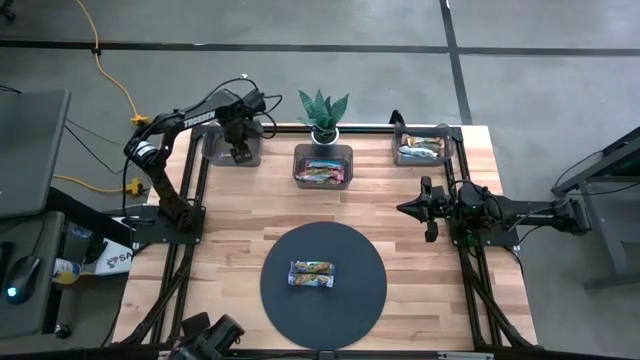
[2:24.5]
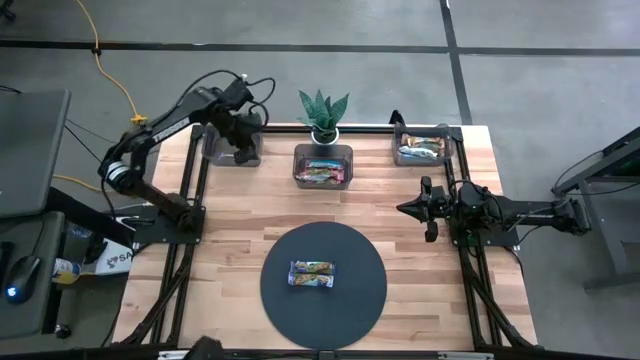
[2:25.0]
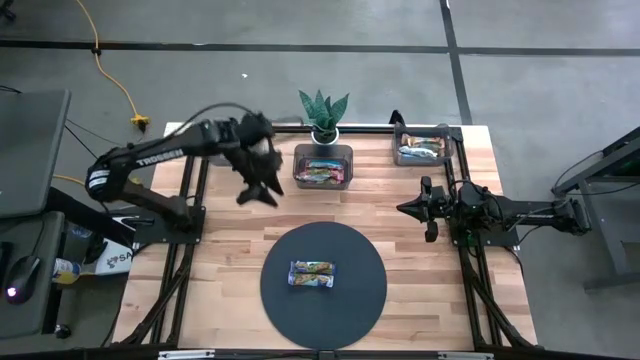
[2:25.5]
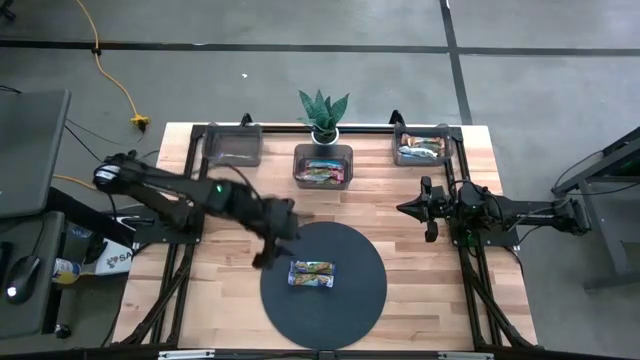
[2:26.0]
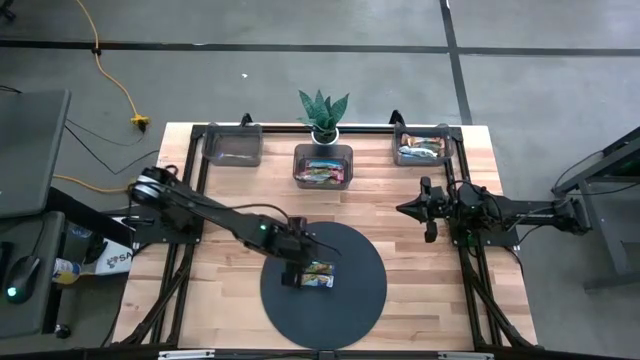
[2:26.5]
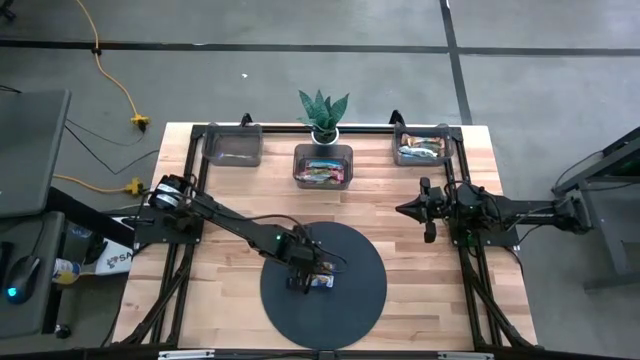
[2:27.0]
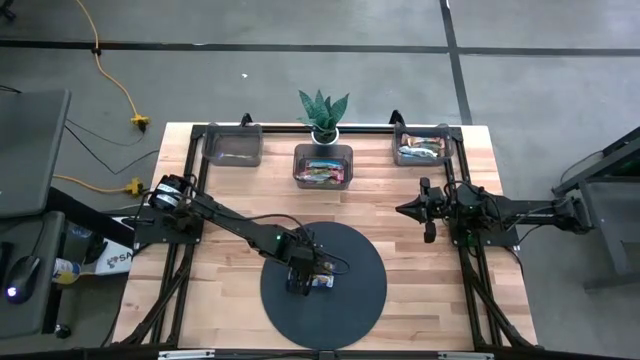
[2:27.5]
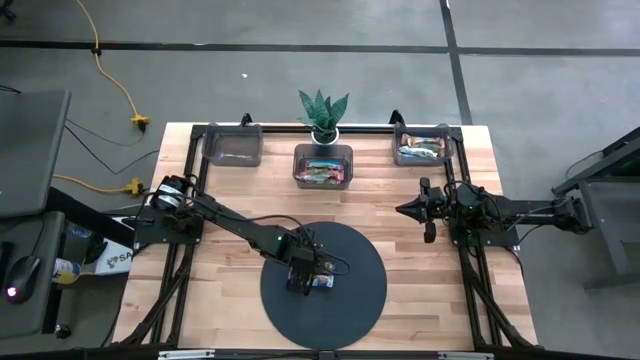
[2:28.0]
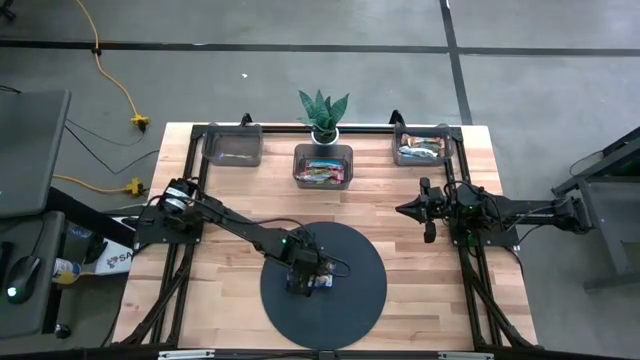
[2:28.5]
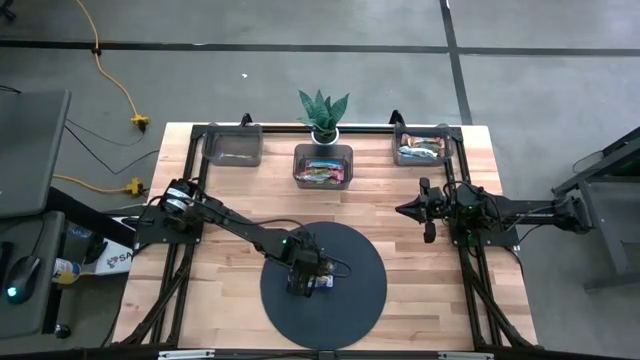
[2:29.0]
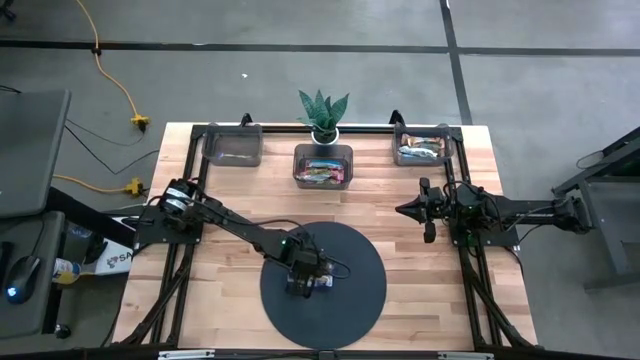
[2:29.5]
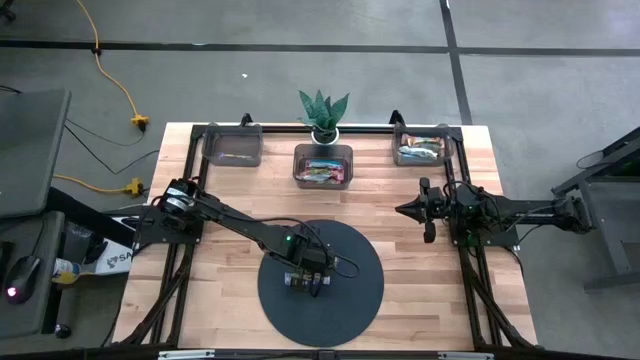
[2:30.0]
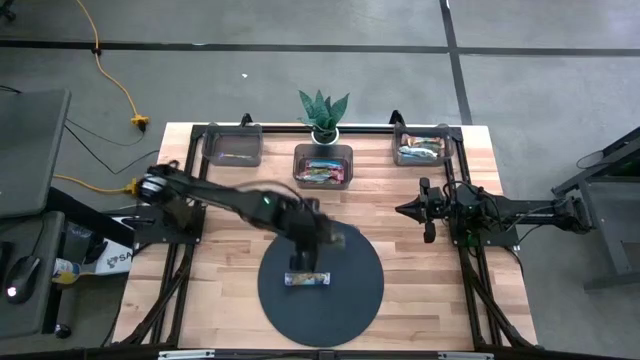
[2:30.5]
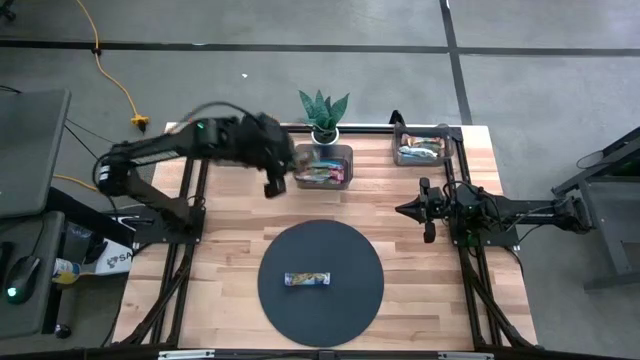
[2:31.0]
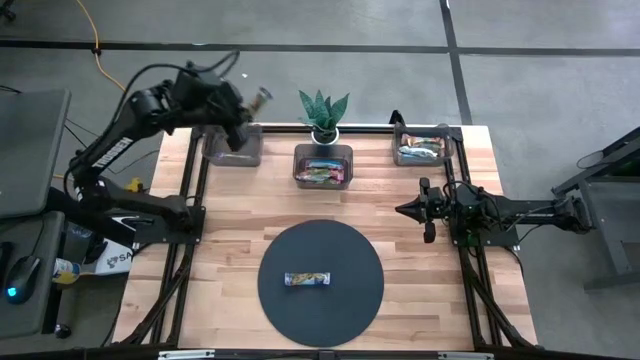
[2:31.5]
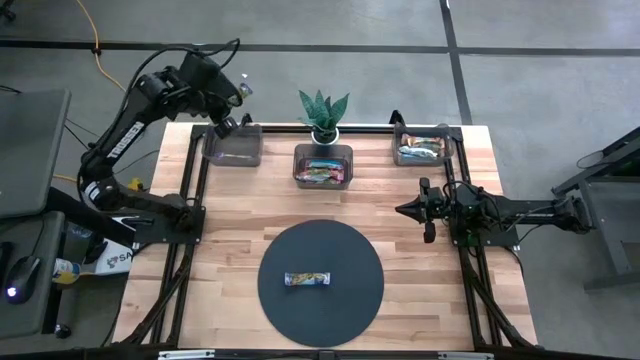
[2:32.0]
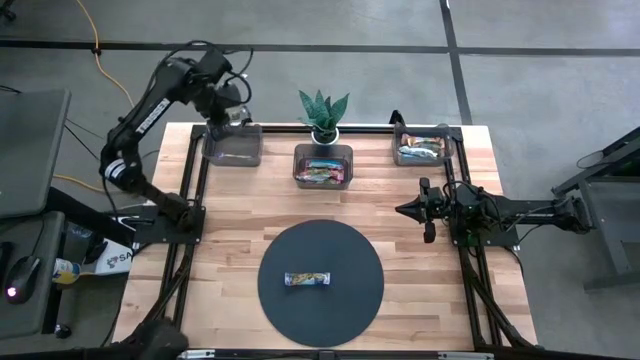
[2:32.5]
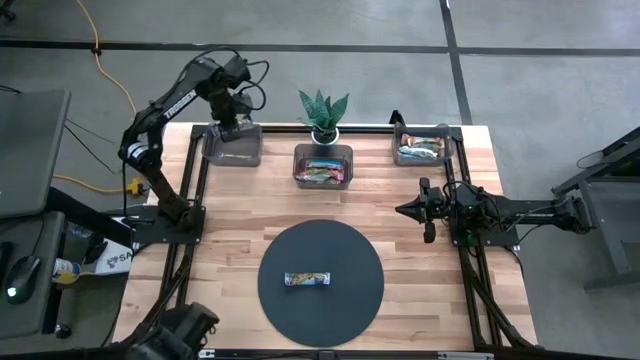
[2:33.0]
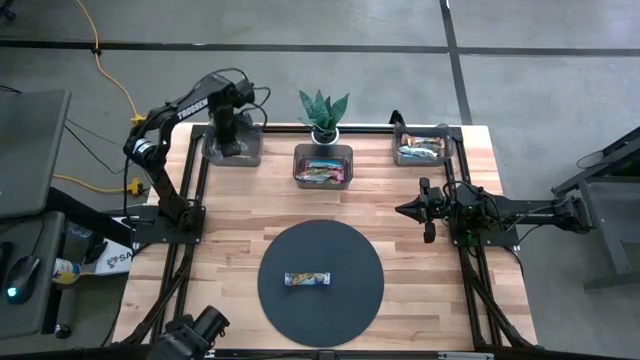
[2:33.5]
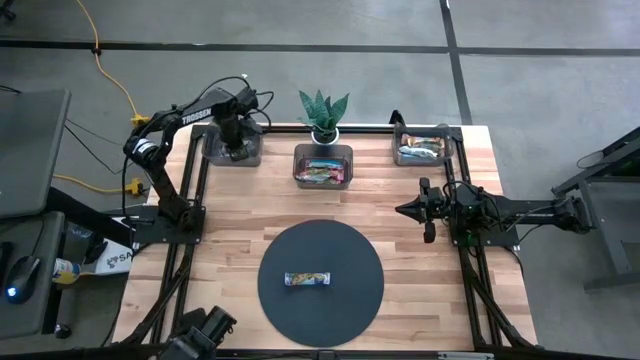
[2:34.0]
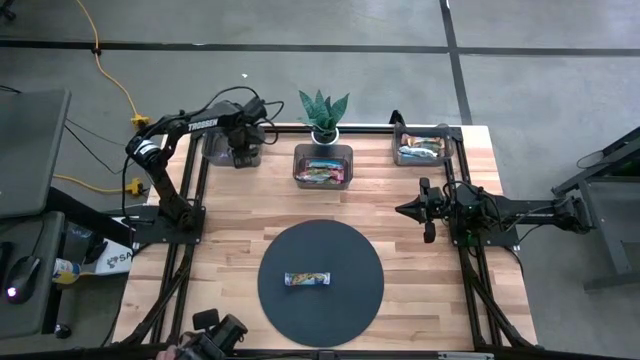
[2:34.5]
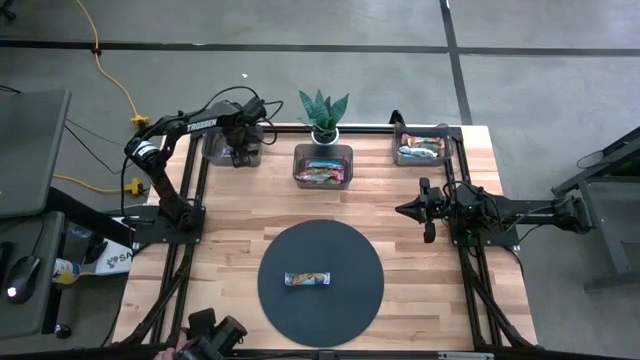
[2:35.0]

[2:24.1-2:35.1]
Task: Pick and place Granola Bars by type
Put the blue granola bar into the left black bin

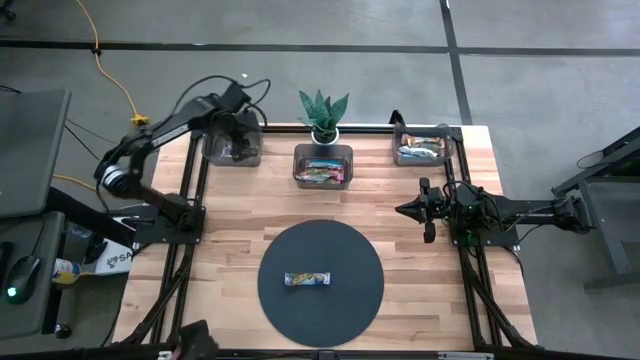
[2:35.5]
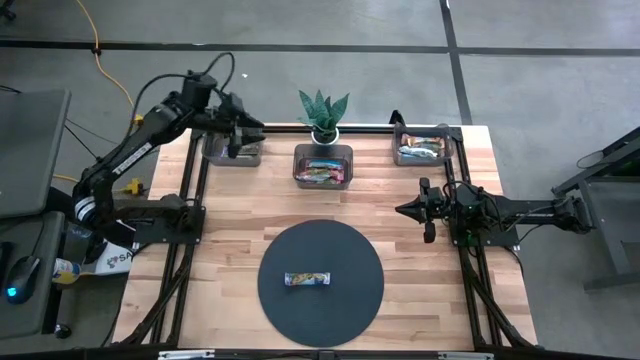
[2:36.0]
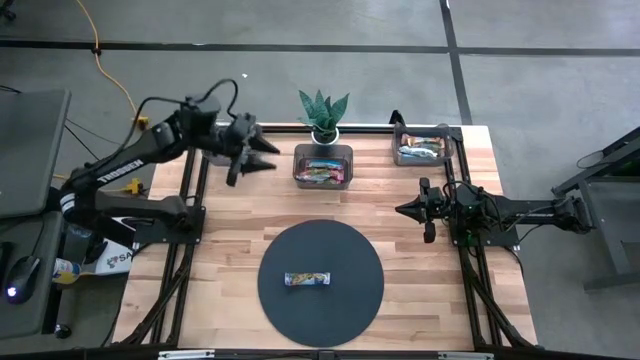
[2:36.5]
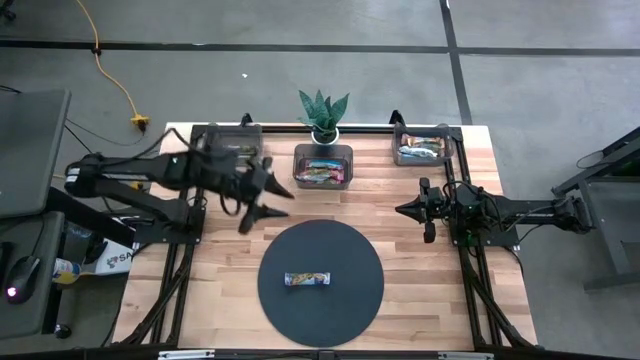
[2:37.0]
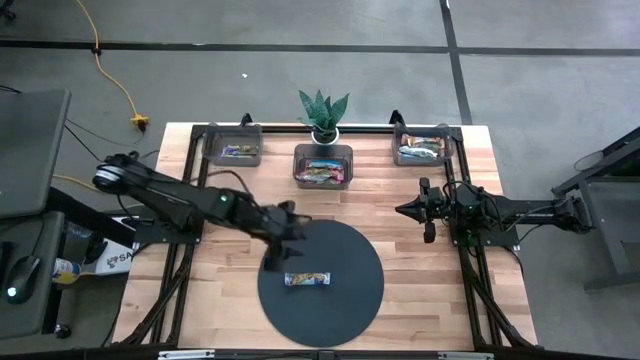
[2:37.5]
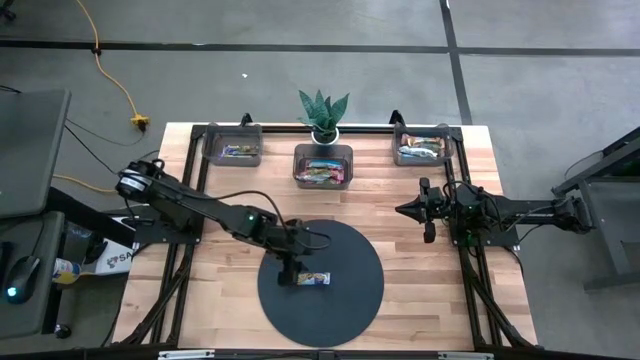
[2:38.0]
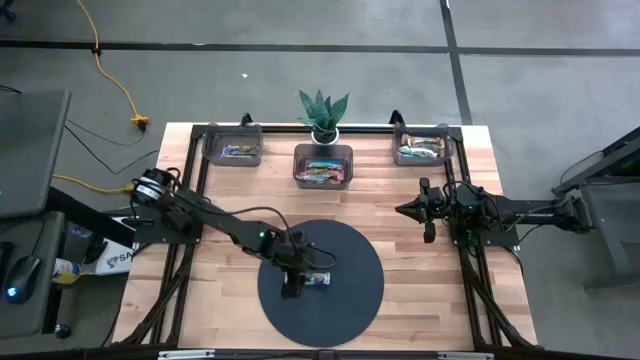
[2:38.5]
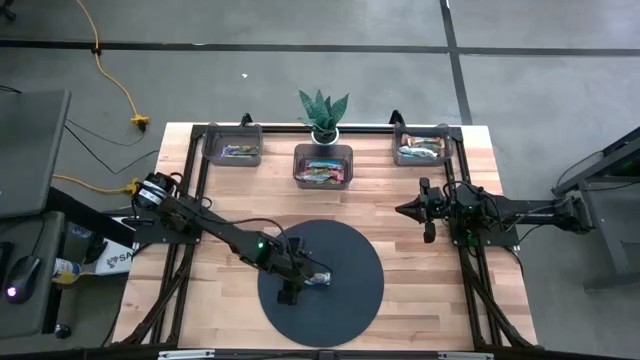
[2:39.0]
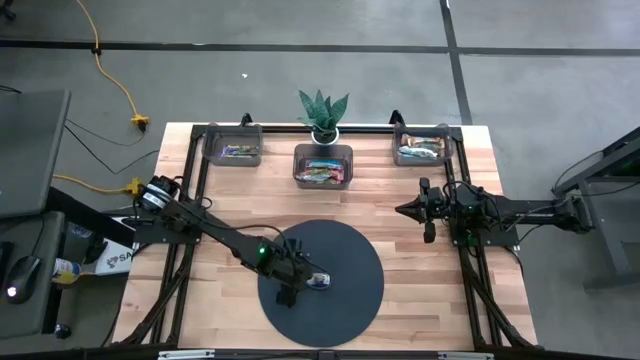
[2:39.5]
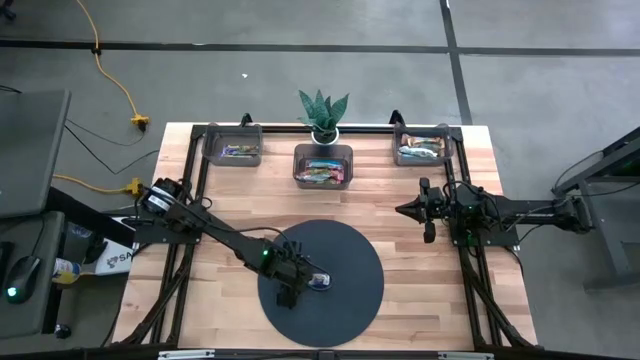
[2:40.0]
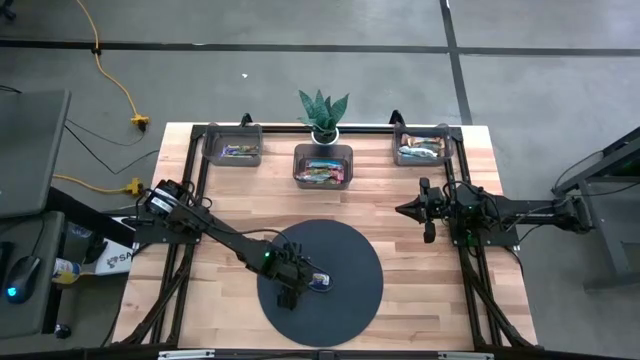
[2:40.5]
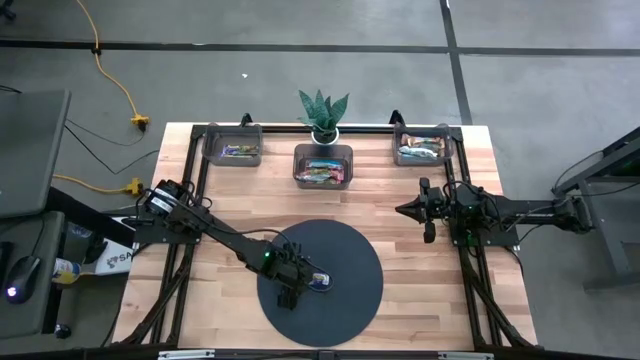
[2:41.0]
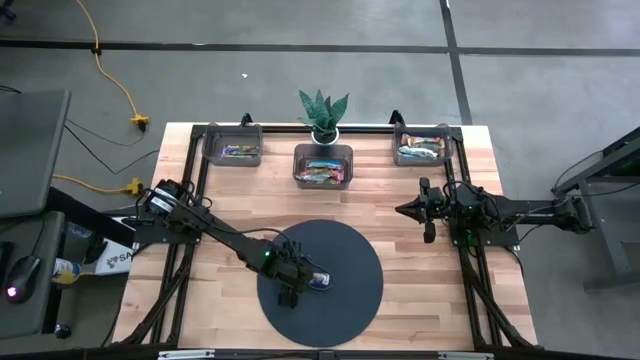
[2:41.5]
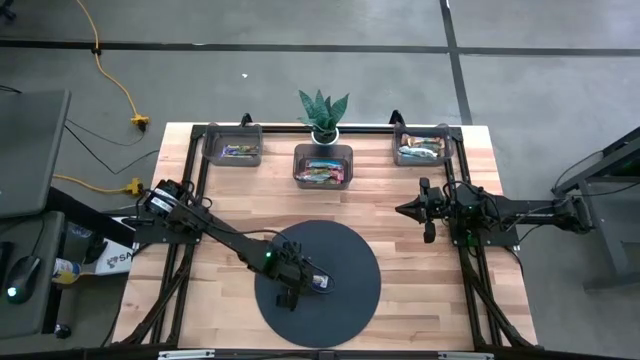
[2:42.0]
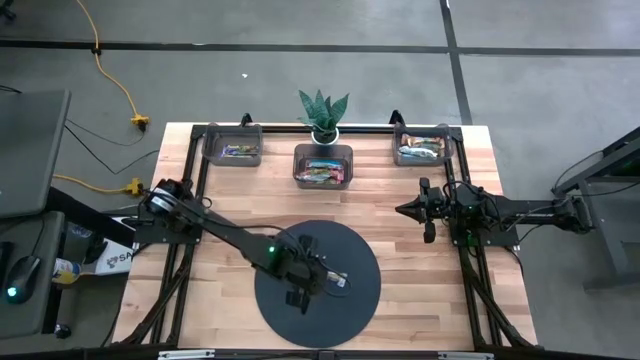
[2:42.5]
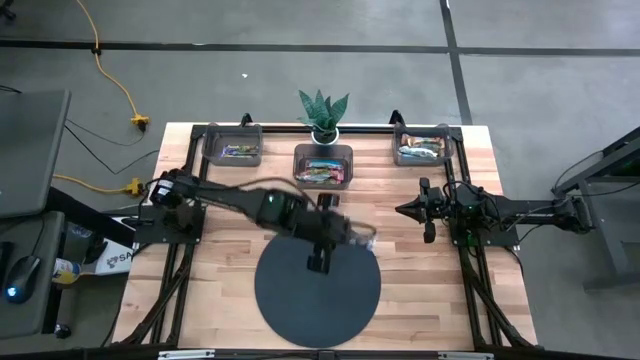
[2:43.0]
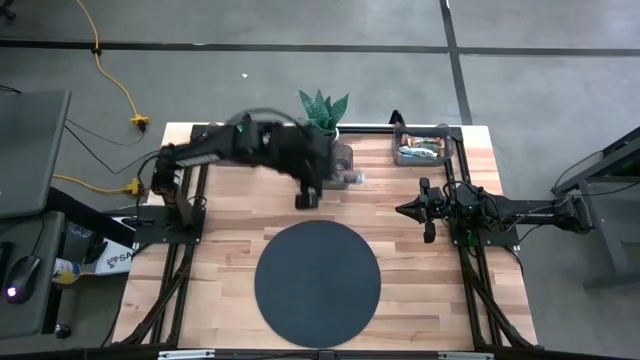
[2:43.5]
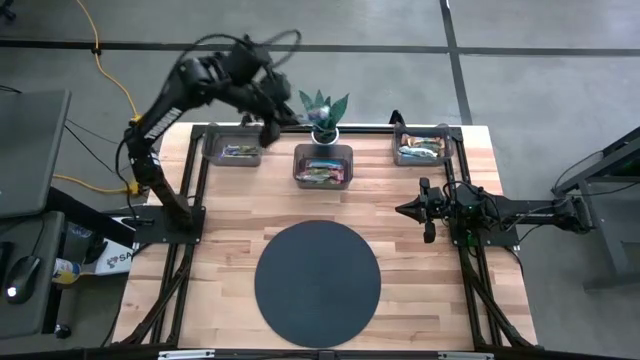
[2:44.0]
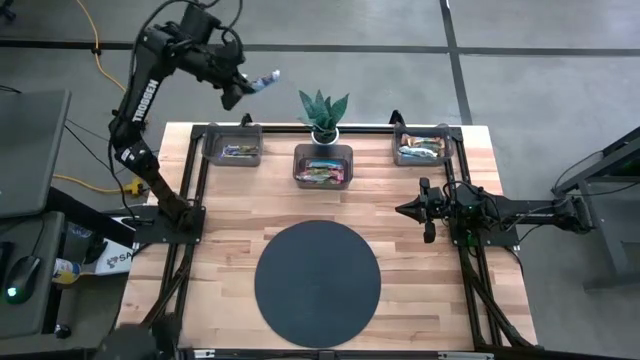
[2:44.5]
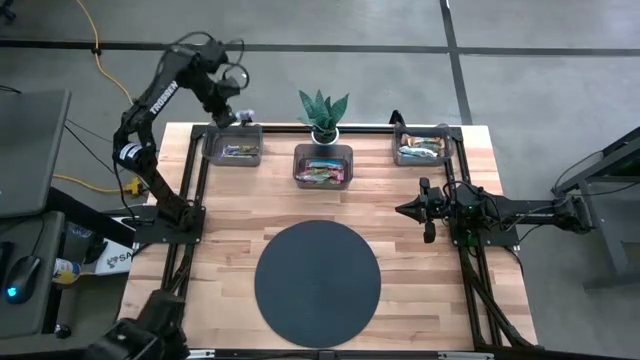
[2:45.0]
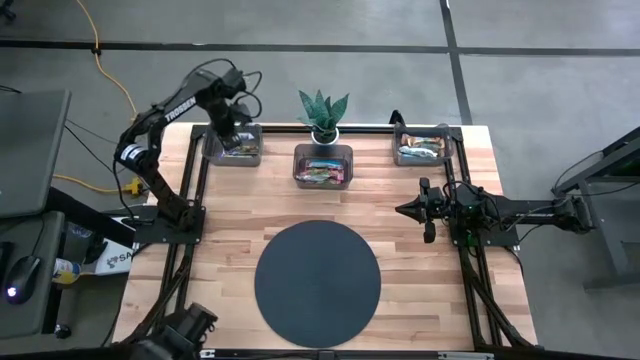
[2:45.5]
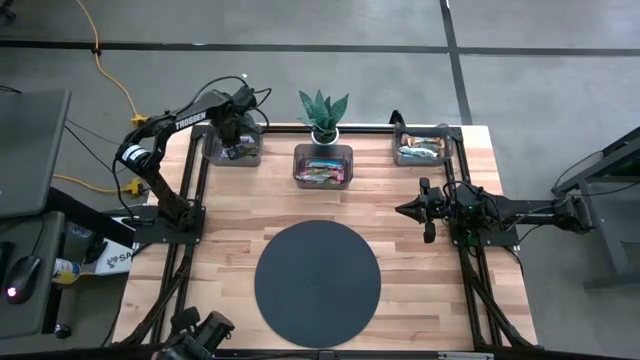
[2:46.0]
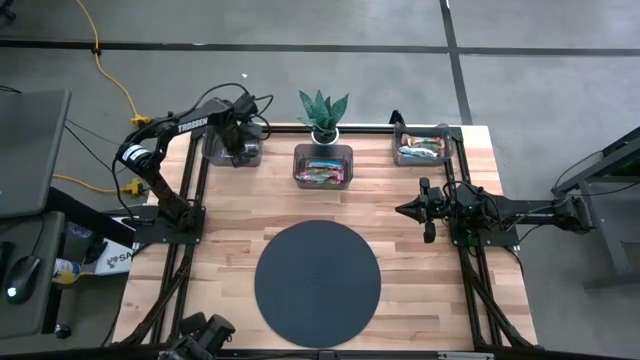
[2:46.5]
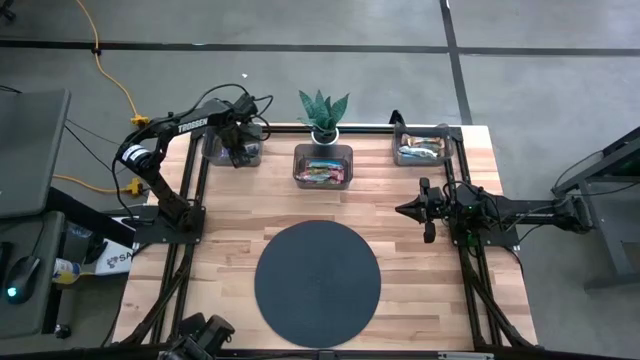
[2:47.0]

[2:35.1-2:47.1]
Put the blue granola bar into the left black bin
